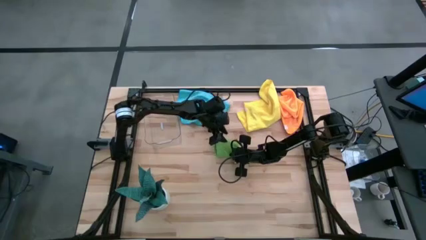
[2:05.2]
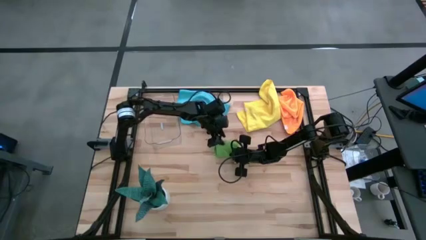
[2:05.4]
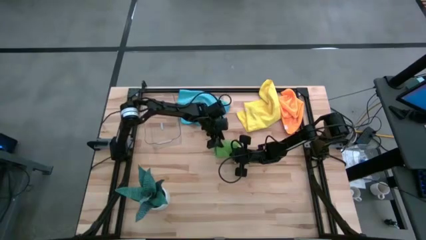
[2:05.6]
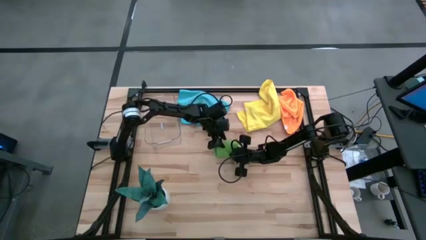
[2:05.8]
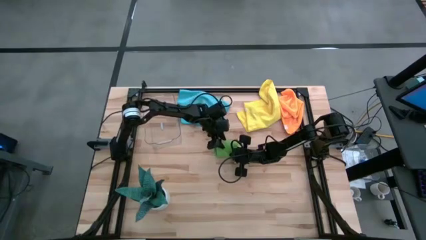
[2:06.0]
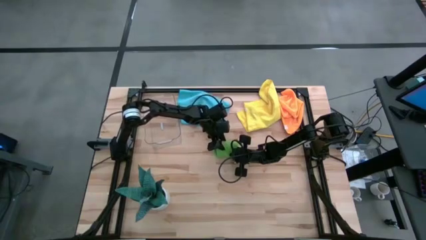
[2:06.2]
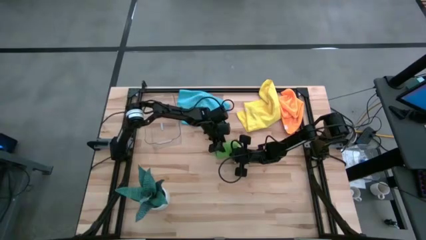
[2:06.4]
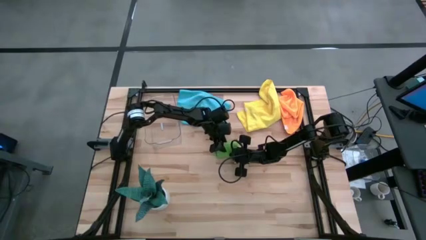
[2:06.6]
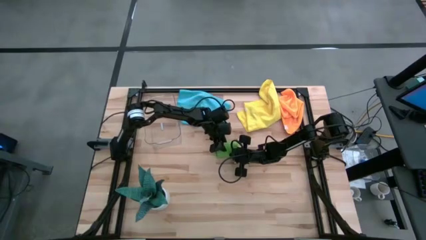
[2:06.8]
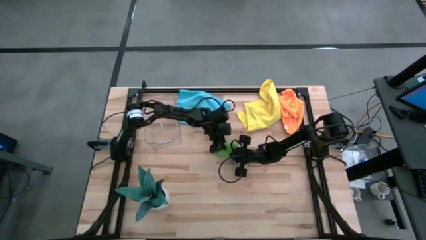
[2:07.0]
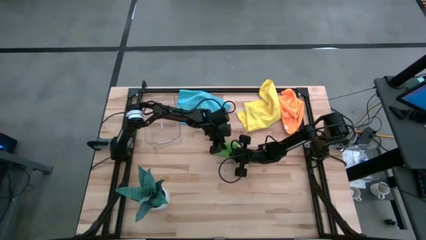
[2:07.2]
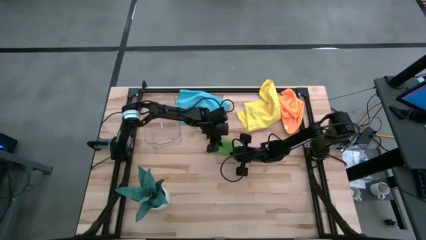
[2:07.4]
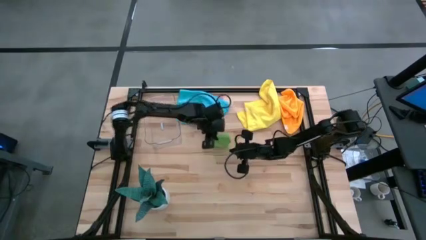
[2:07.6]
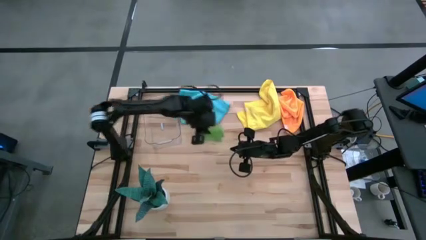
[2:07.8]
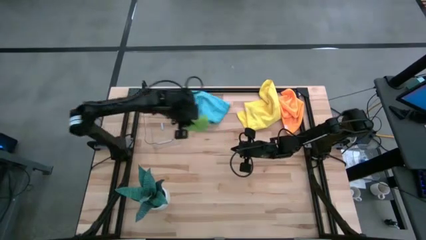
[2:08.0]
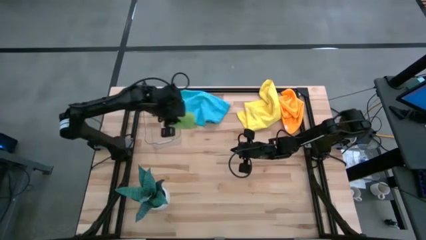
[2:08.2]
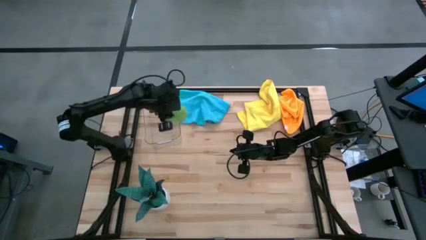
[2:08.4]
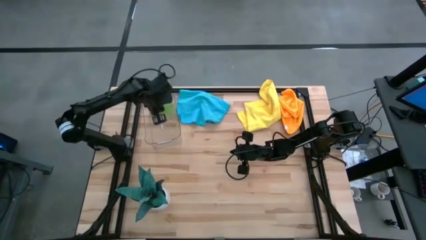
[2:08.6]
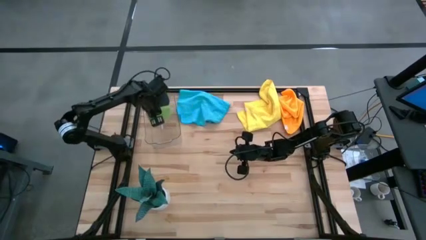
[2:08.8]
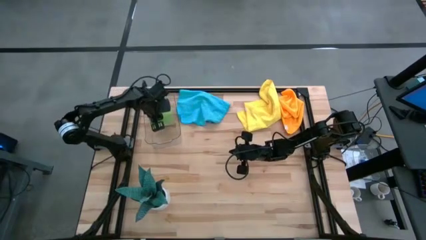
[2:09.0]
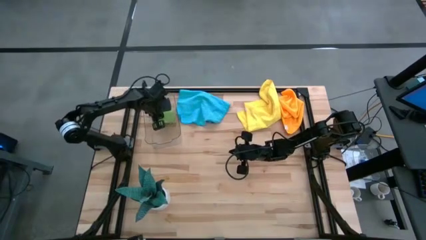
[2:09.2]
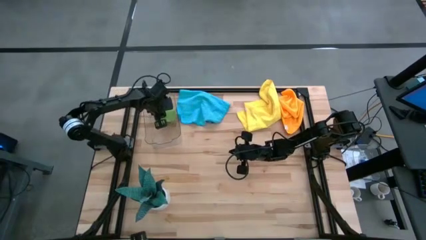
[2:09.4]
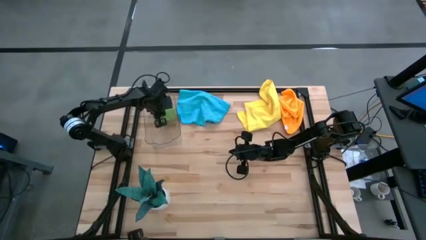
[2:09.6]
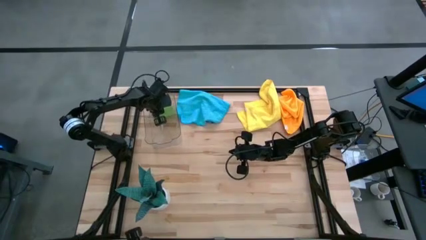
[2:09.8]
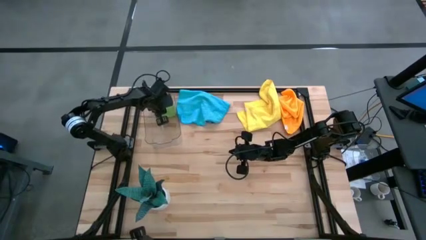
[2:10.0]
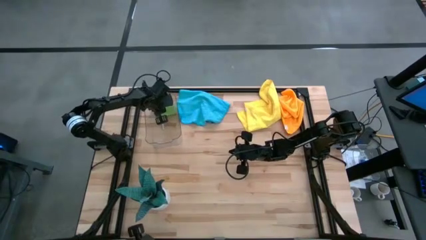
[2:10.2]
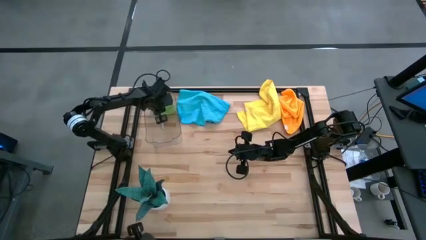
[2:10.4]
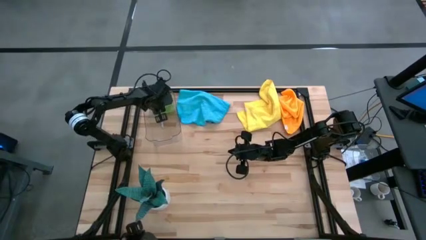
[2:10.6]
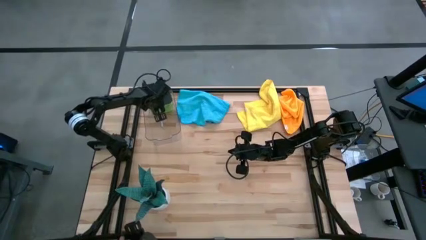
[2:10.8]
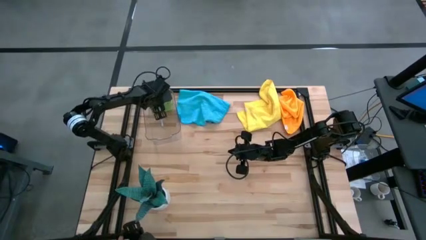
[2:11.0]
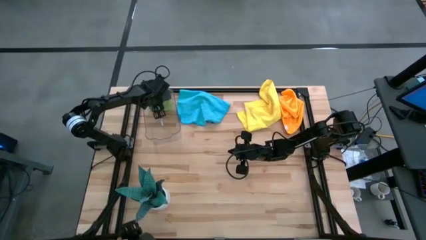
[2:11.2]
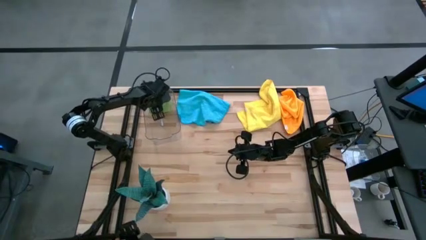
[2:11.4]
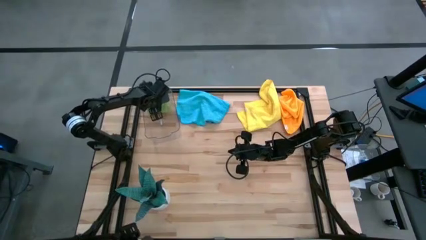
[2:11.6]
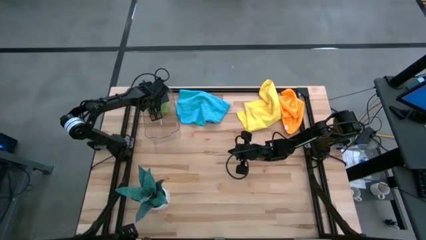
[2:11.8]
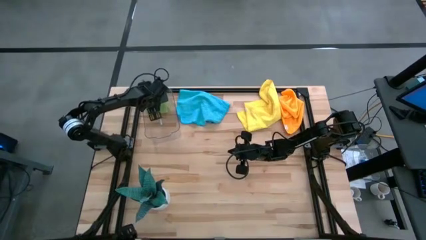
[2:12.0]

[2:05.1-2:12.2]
Task: Roll microfiber towels into tight, uniform cylinder then place into a basket
Put the rolled green microfiber towel into the transparent bin

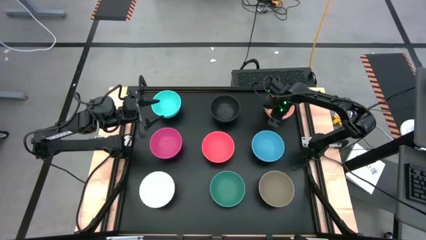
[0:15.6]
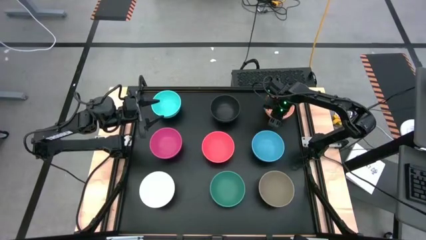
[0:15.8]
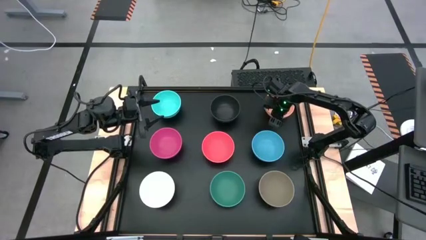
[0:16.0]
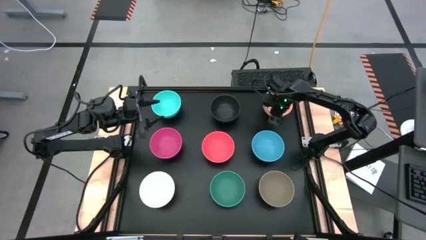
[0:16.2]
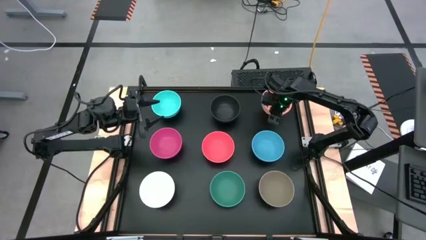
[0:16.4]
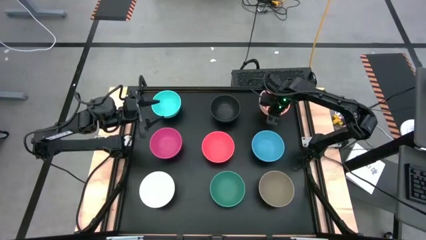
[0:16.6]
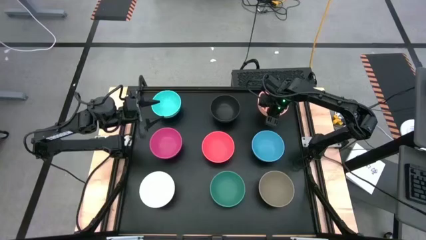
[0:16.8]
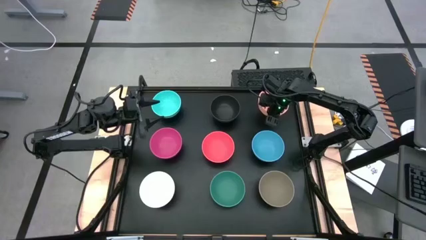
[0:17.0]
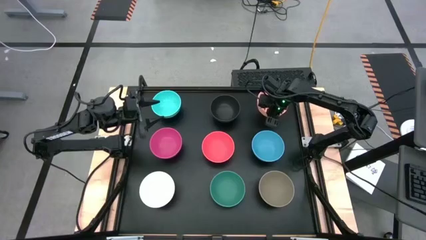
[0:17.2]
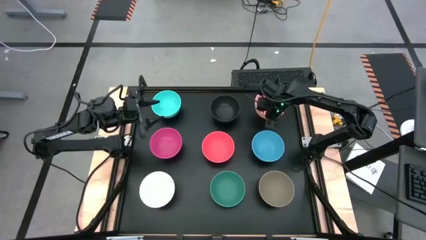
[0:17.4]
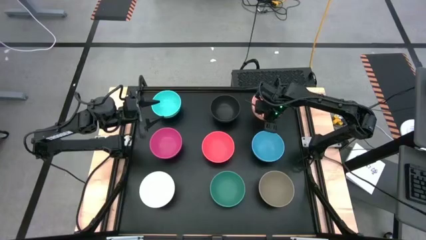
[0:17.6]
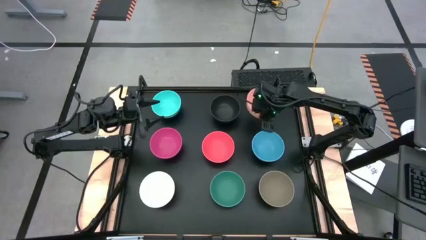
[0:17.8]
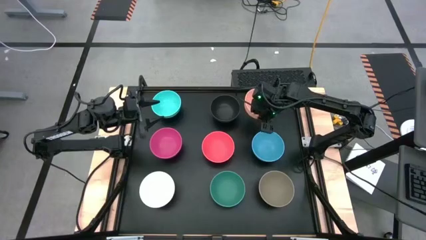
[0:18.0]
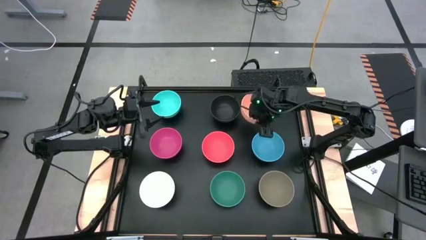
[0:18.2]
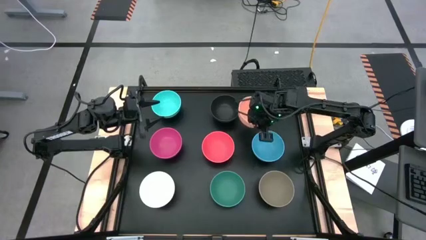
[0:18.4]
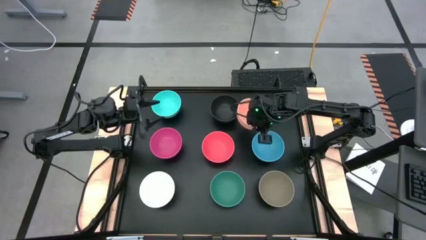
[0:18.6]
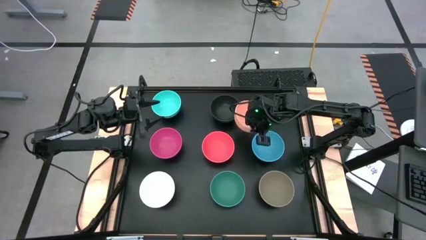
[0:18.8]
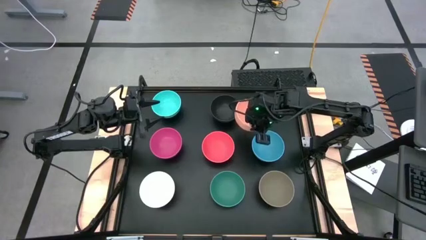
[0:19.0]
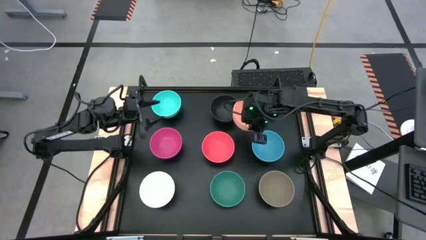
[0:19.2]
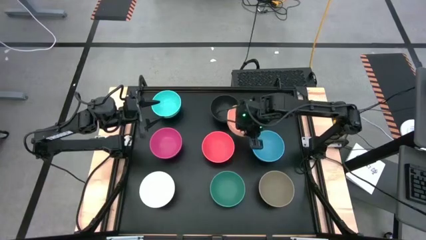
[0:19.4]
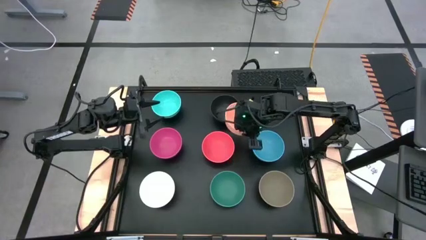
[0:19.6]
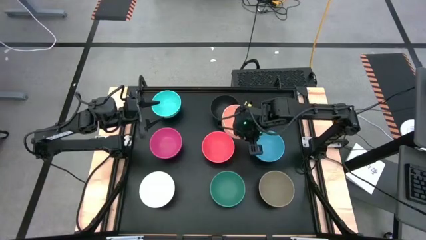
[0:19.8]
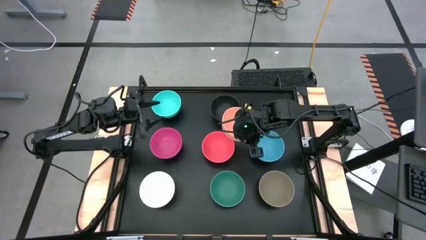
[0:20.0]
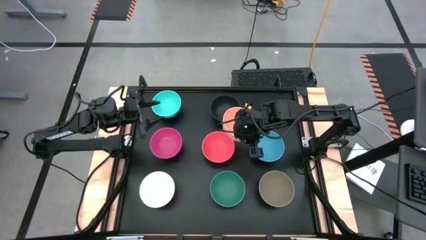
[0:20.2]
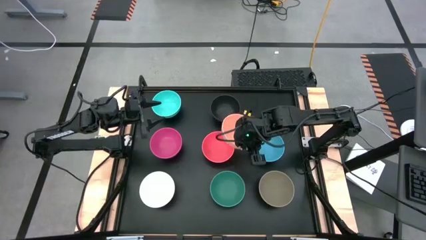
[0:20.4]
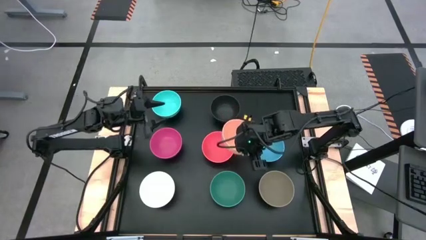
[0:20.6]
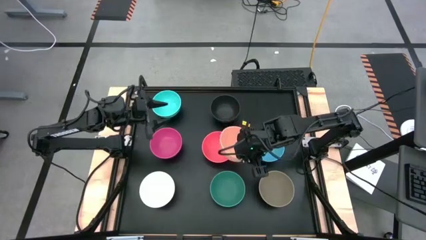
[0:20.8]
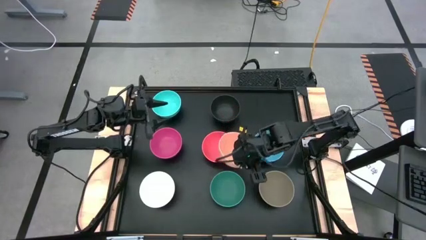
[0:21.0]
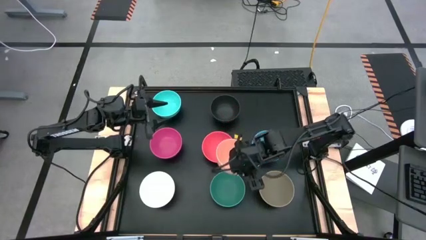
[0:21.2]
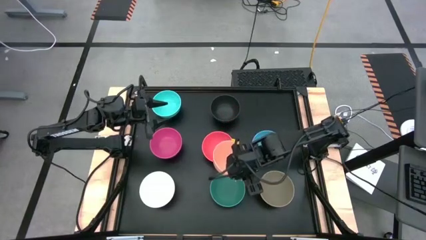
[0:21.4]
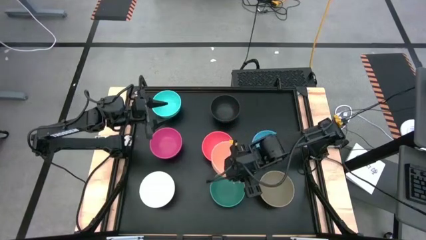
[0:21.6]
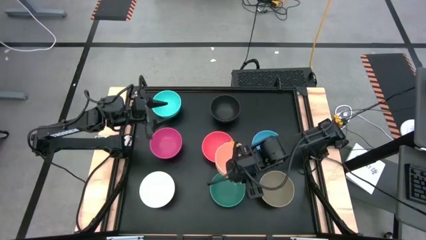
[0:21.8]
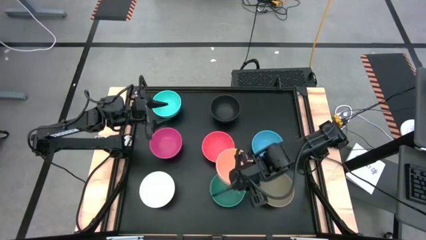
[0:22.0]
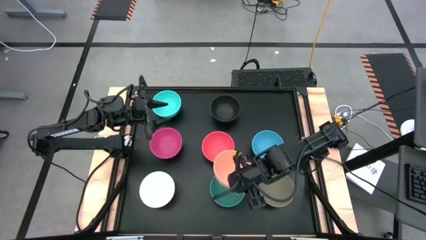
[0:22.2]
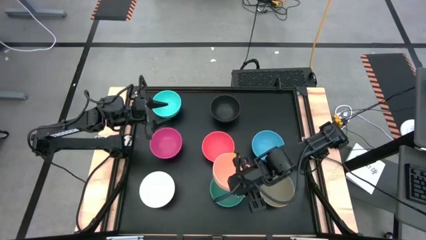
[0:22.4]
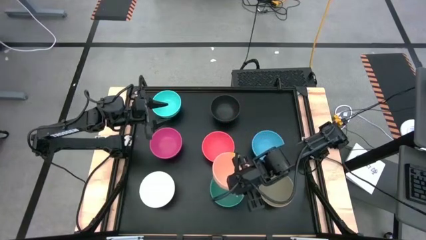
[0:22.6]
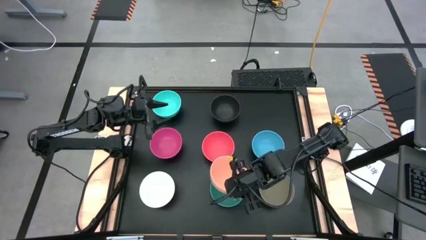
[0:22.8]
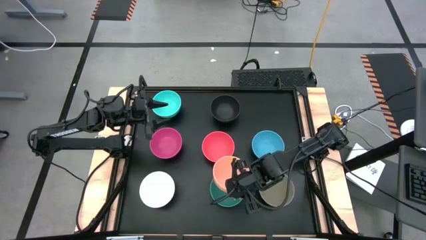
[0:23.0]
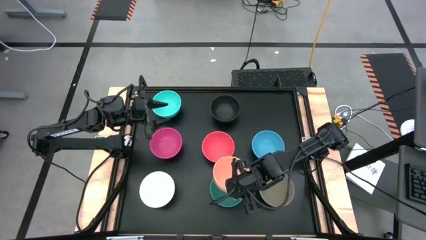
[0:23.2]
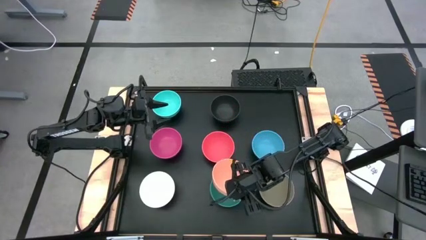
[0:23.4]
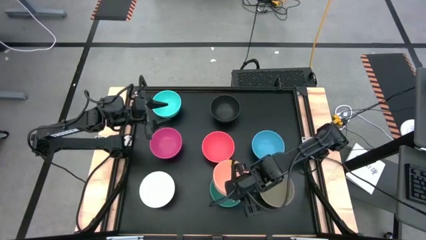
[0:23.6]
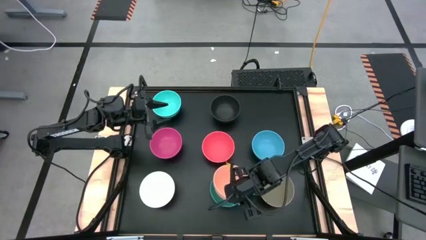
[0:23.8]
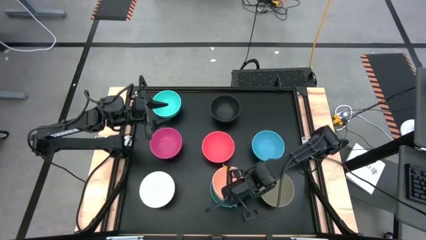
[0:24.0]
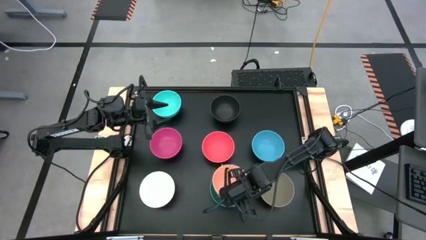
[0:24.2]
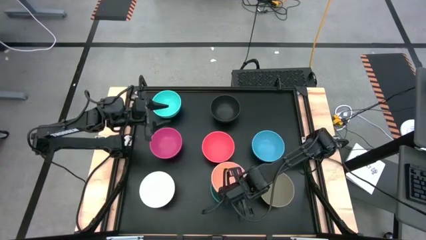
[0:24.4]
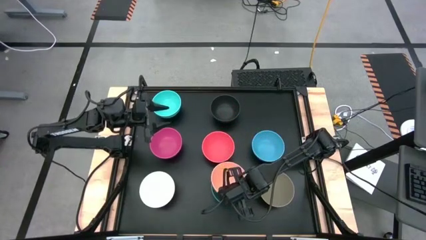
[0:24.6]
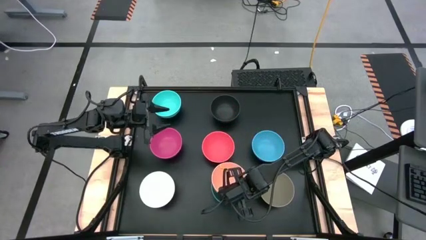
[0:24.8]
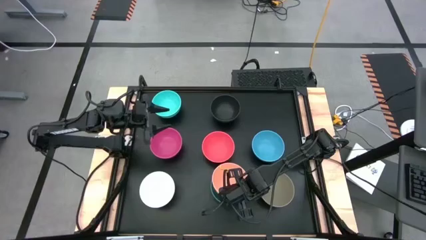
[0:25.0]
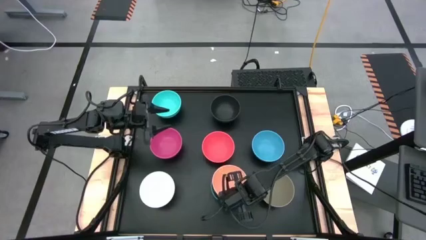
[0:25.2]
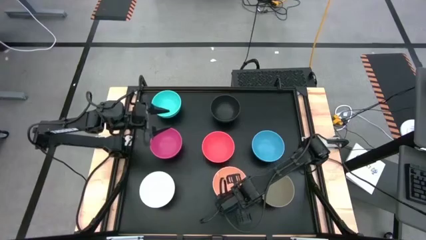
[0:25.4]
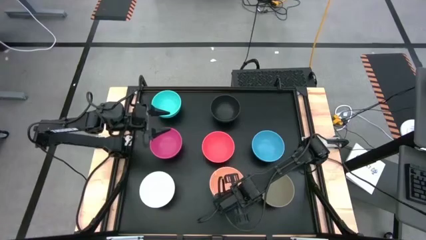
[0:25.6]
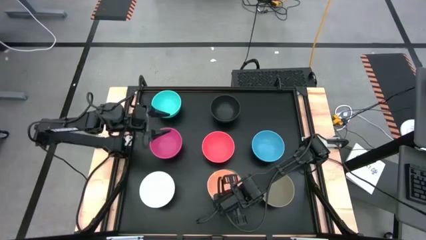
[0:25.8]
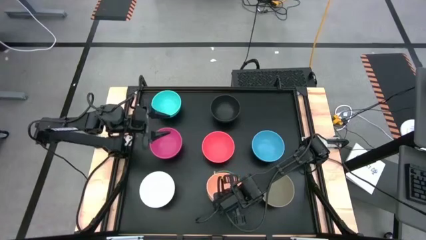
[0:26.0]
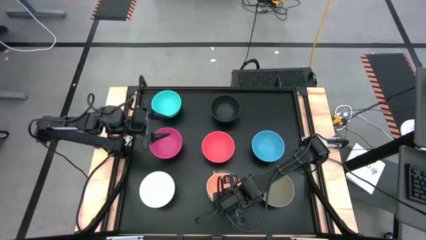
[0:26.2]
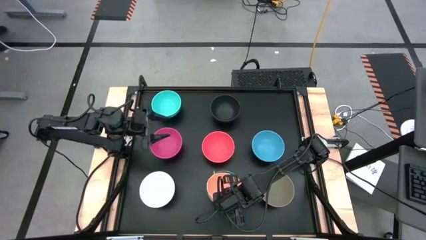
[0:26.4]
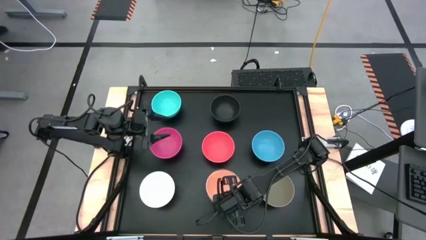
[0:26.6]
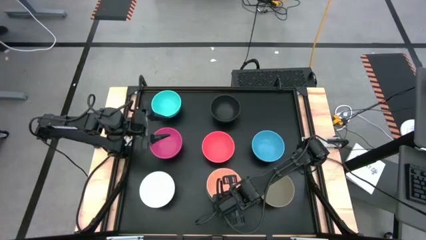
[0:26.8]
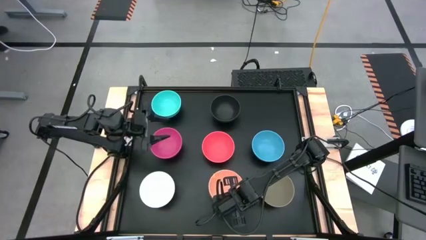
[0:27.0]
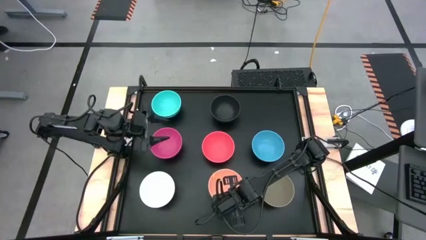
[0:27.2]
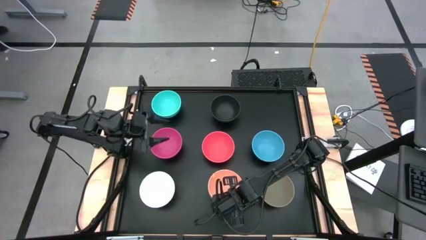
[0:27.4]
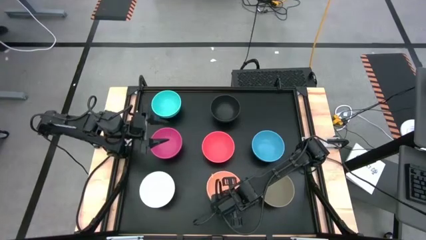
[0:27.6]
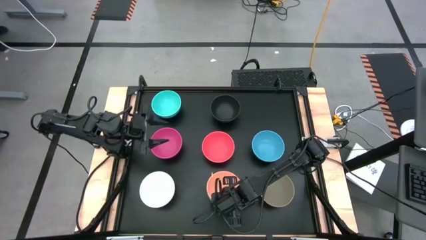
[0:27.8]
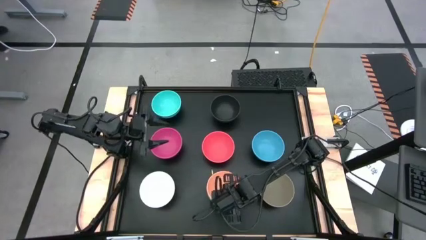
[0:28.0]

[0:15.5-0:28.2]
Task: Nest bowls inside each other
Stack the light orange bowl on top of the green bowl
